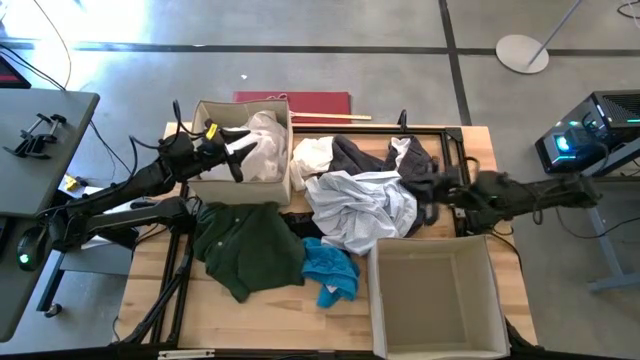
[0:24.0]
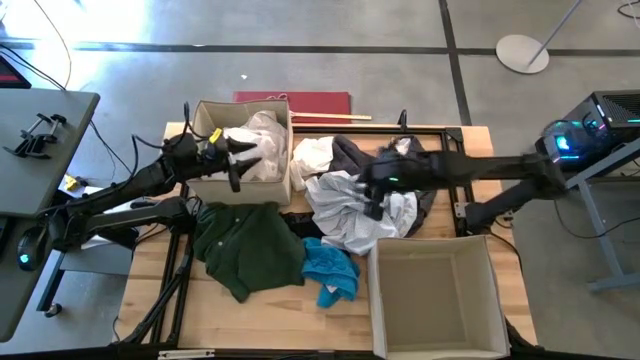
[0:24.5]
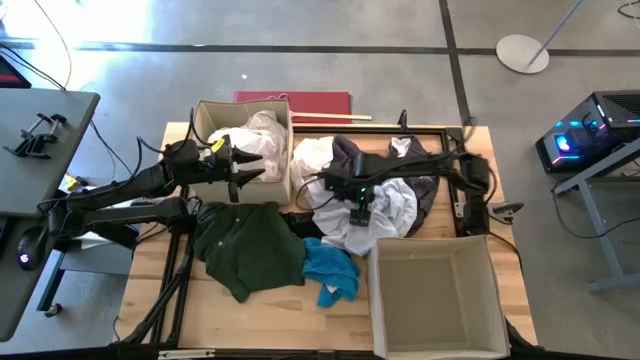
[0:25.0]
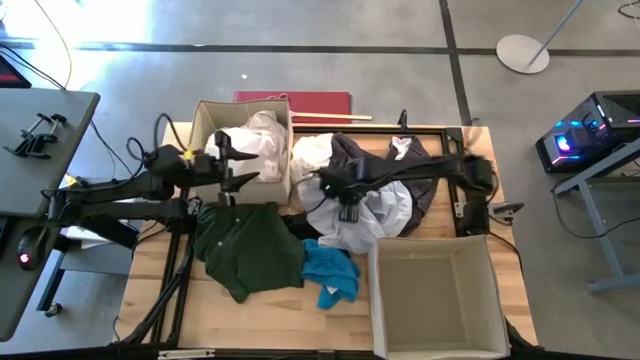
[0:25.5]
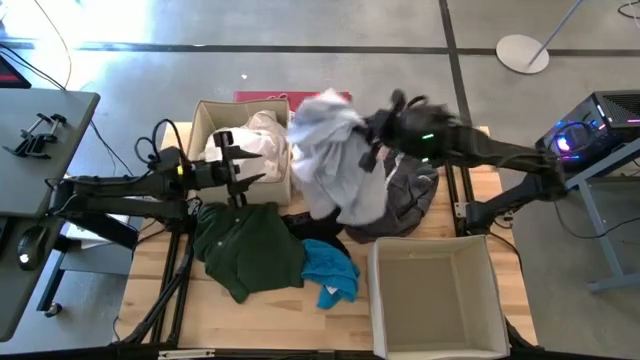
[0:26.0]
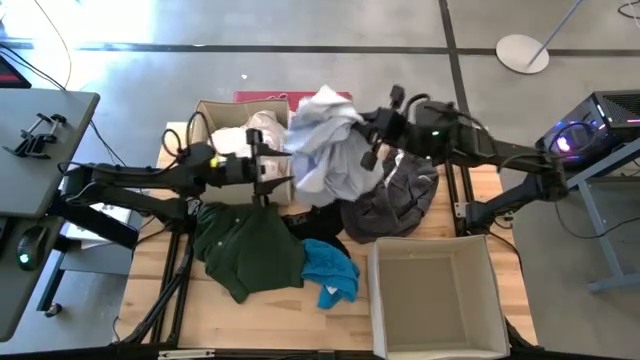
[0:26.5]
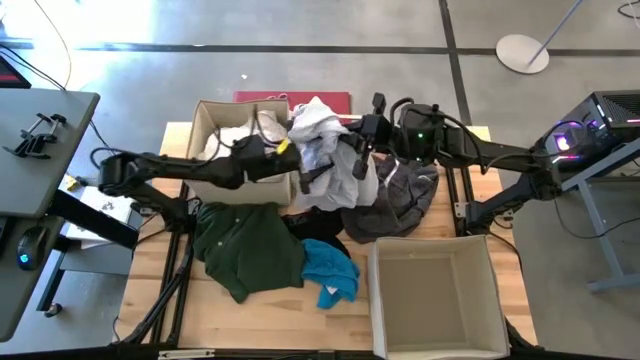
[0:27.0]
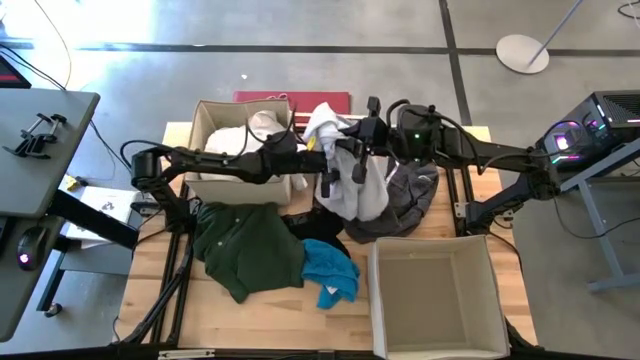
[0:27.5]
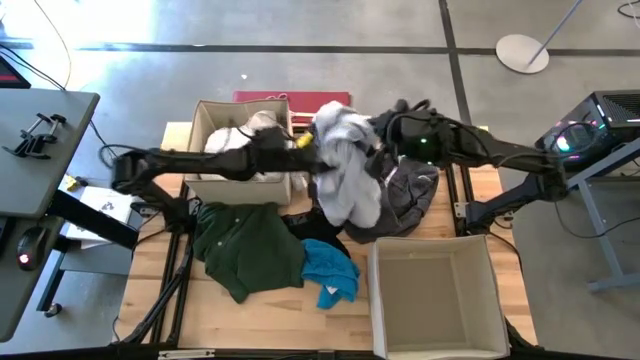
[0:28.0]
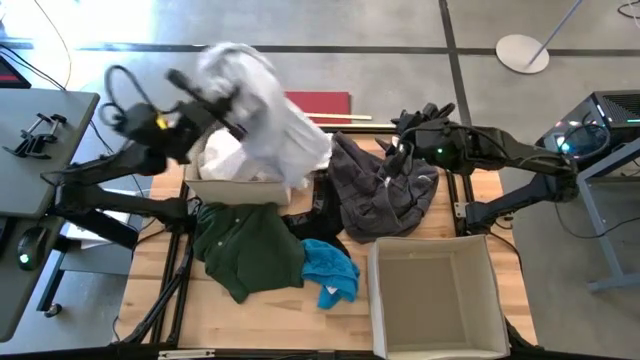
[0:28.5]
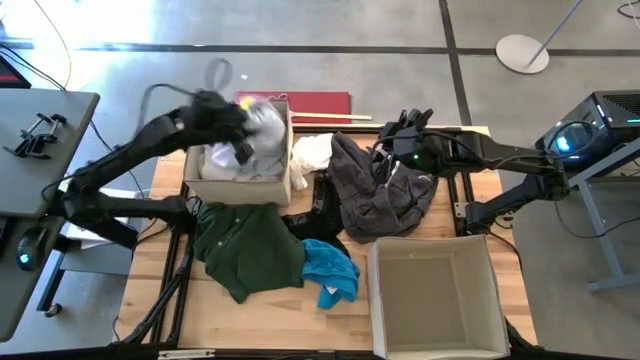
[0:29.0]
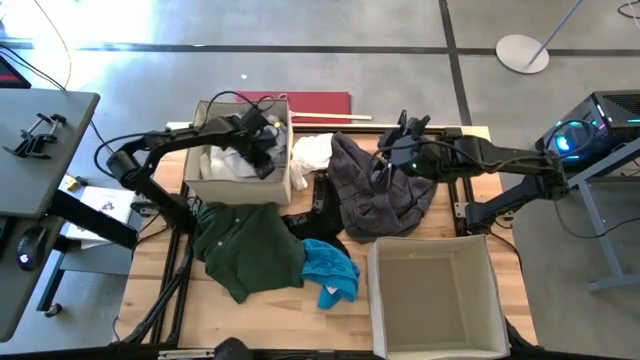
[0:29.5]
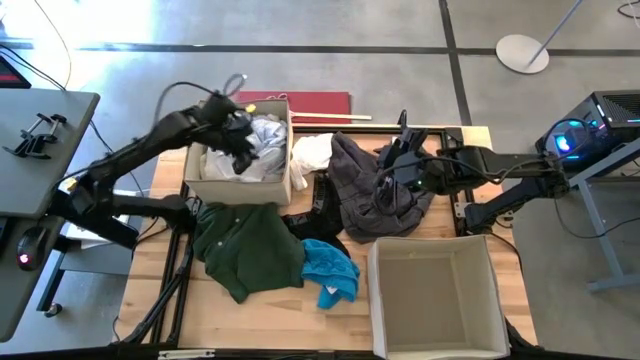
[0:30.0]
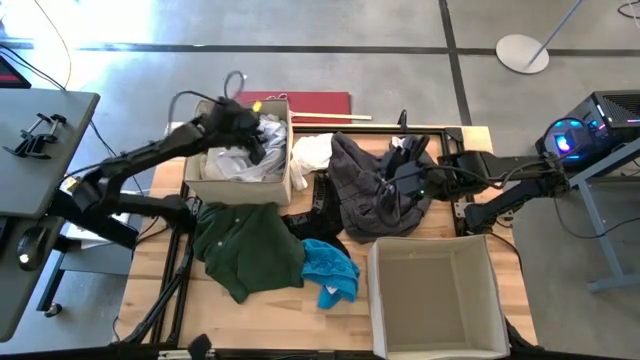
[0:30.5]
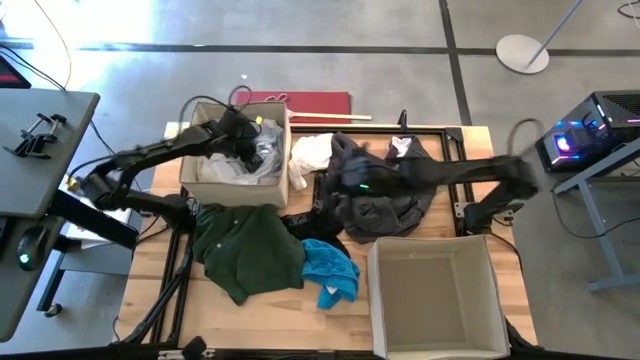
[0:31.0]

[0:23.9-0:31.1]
Task: Sort clothes
Put the gray dotted shirt into the top laundry organizer

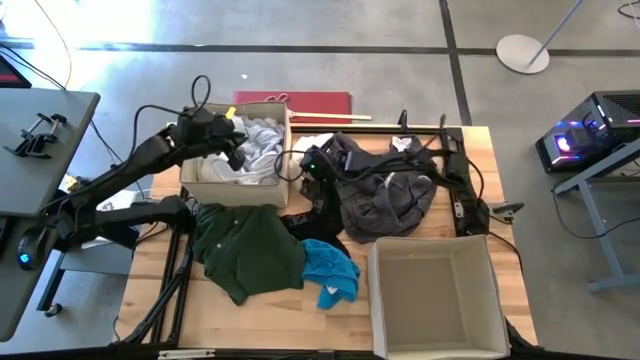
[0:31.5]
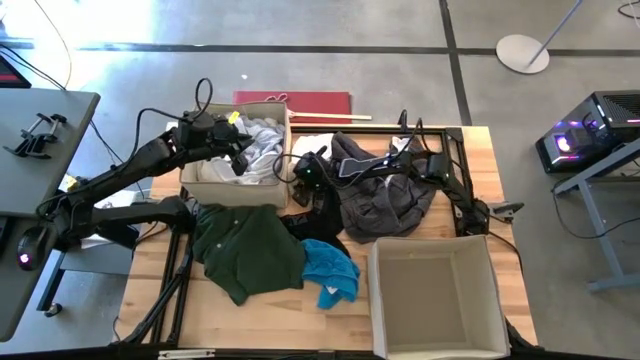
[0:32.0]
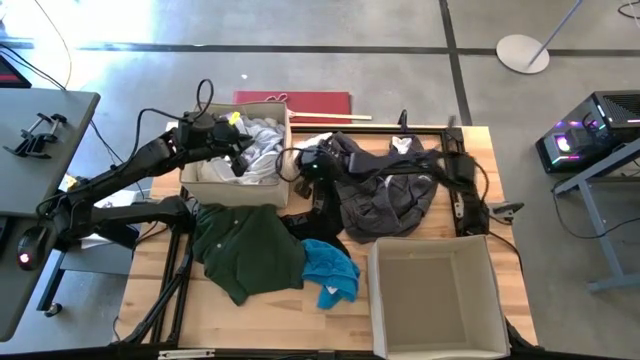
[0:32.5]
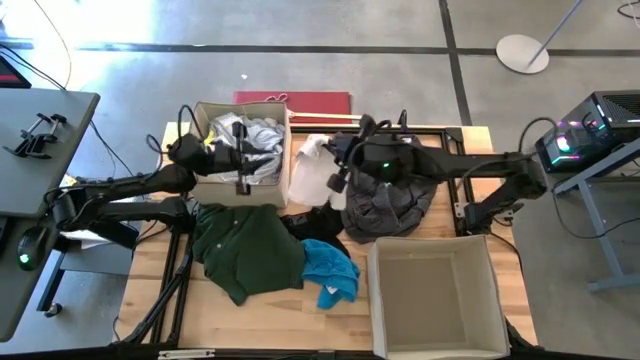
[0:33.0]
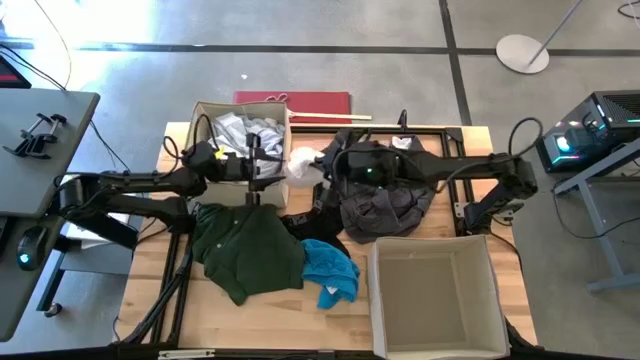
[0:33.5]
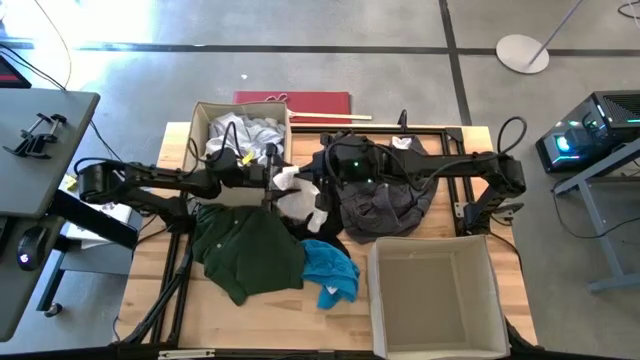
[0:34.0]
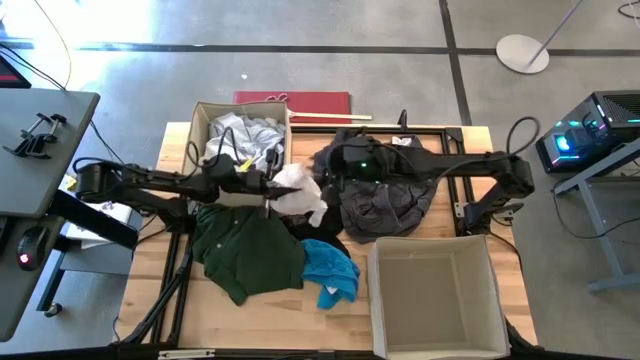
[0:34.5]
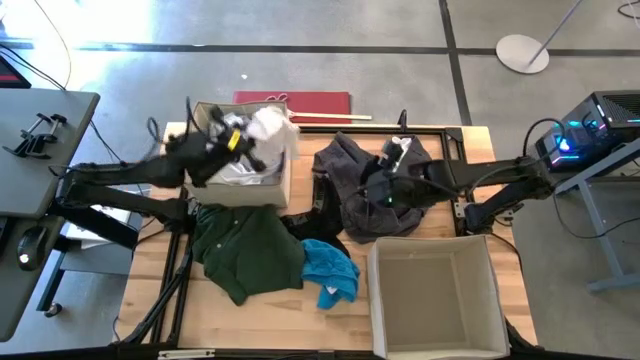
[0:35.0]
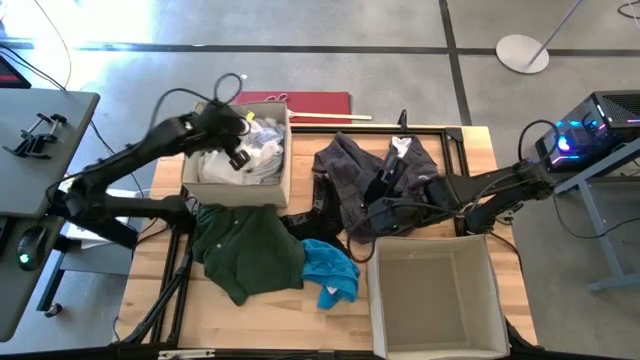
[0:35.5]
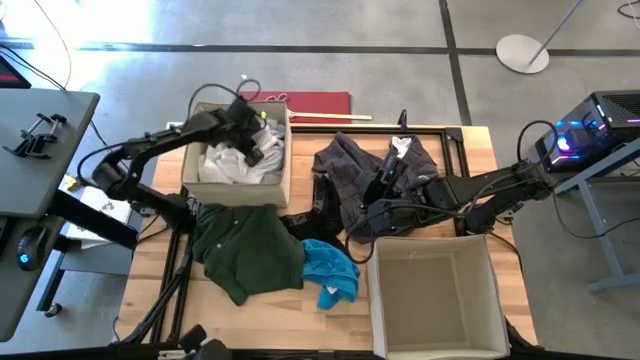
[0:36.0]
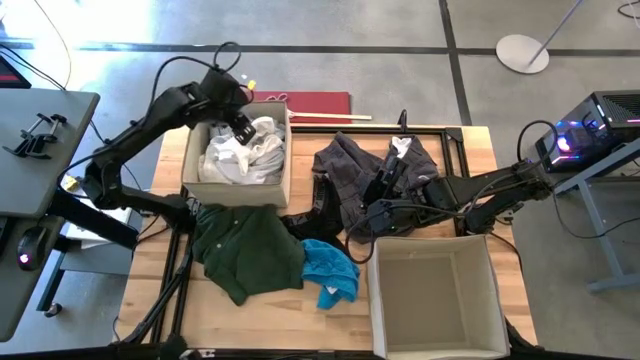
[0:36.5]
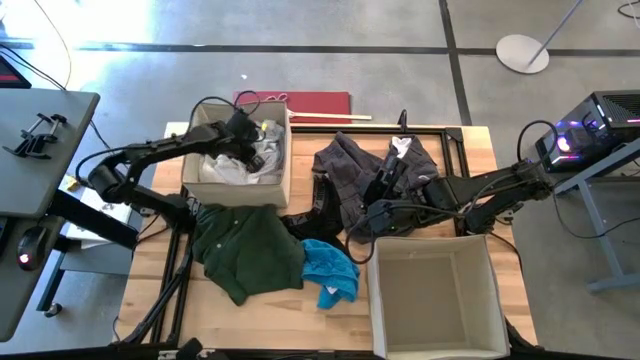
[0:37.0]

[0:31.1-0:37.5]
Put the white underwear into the top laundry organizer

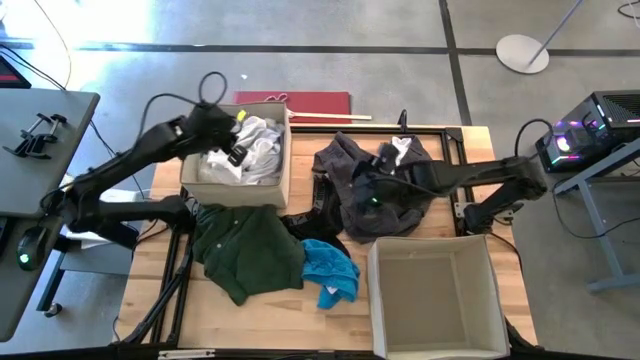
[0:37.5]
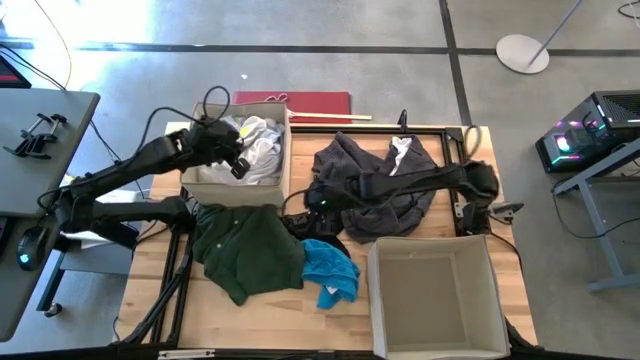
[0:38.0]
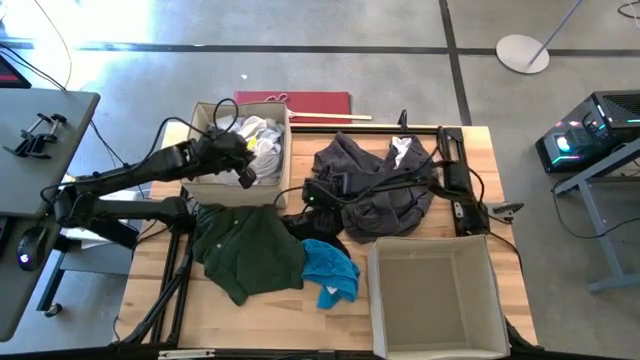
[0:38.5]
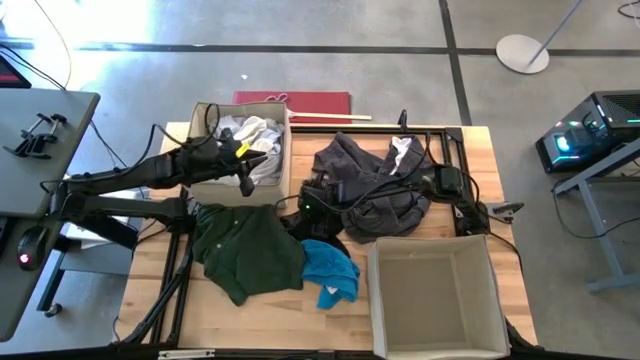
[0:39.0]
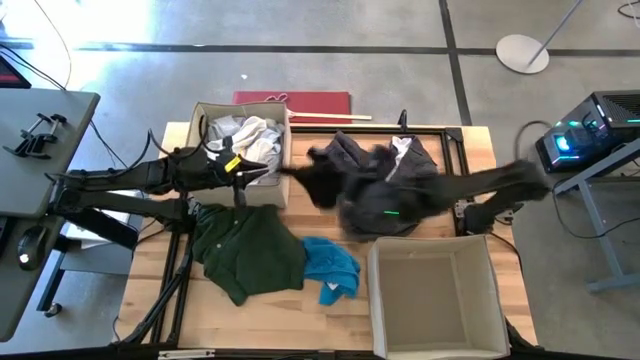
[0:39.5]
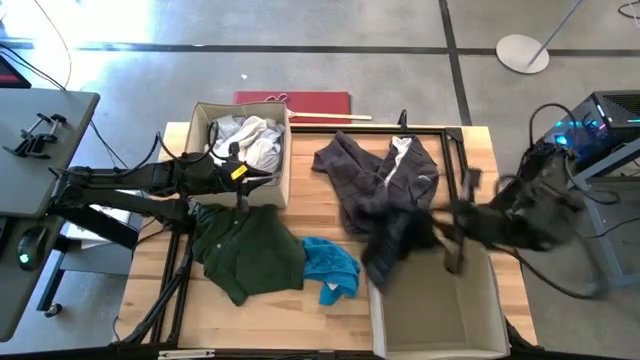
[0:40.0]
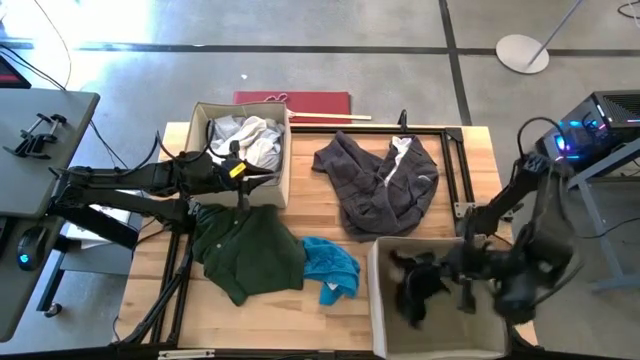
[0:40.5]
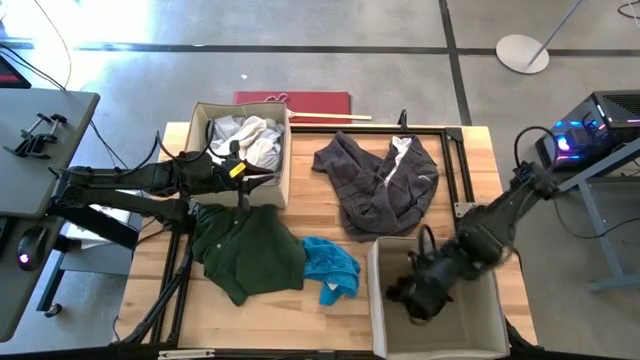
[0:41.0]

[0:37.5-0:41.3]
Put the black boxer into the bottom laundry organizer

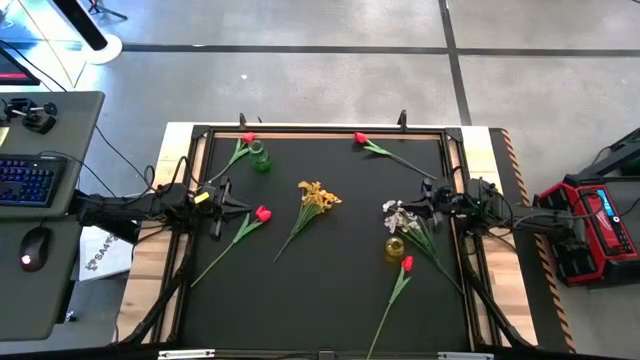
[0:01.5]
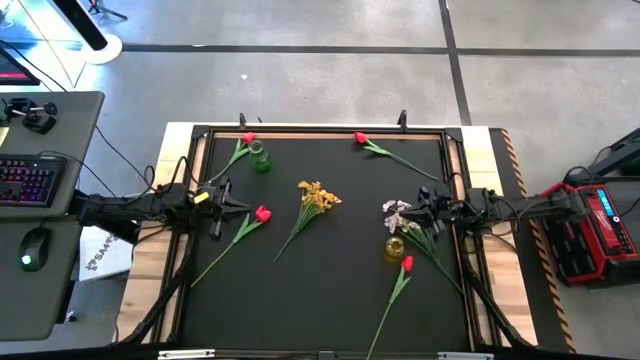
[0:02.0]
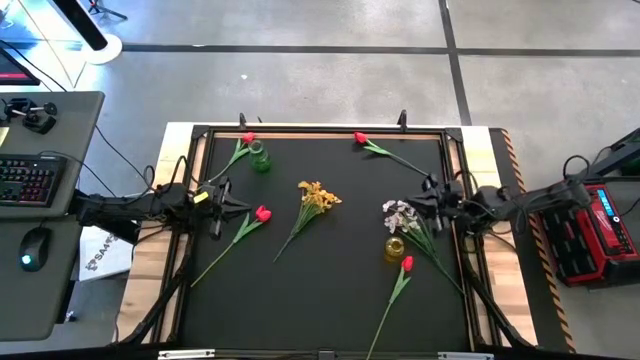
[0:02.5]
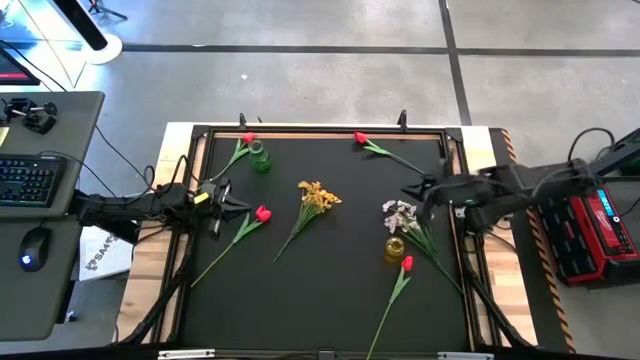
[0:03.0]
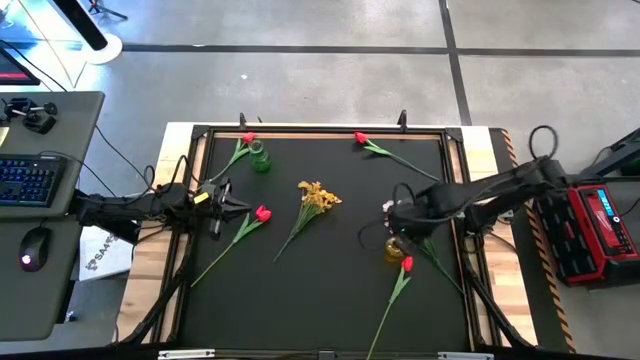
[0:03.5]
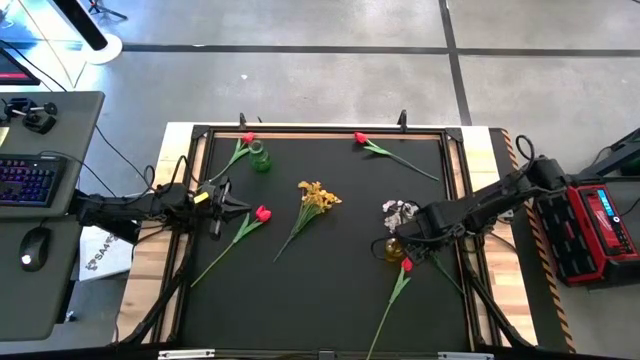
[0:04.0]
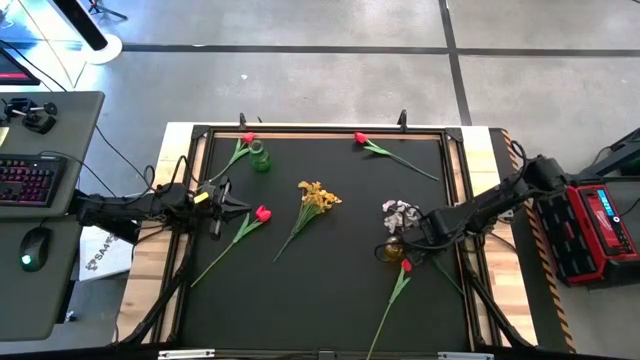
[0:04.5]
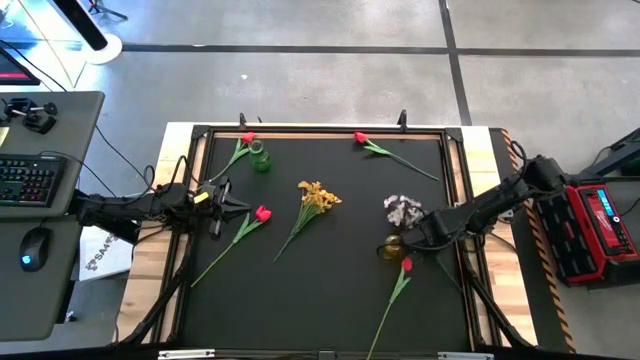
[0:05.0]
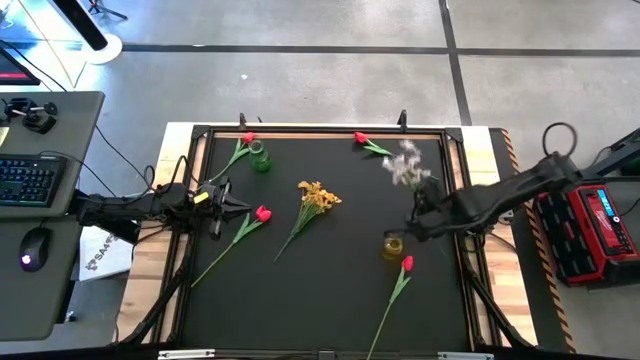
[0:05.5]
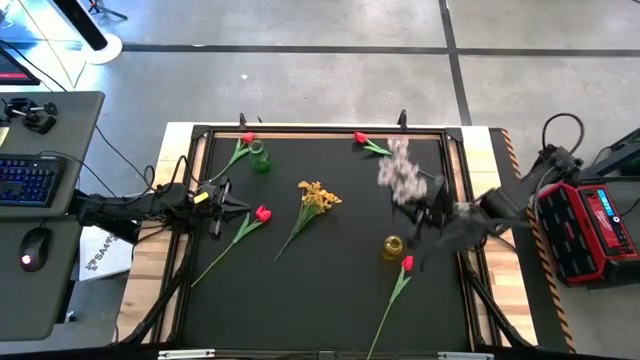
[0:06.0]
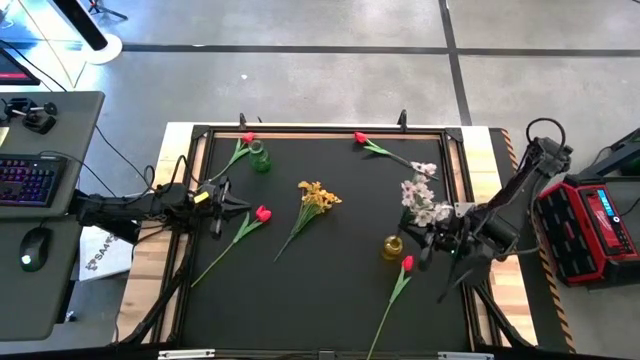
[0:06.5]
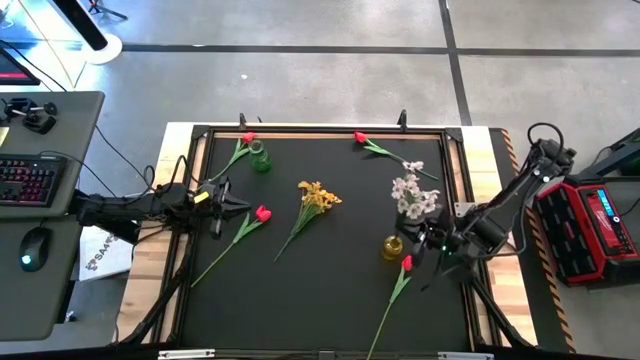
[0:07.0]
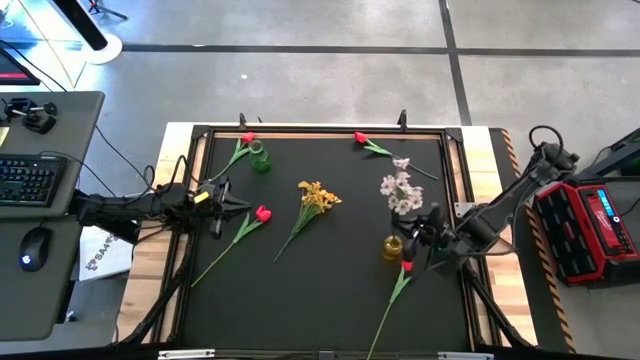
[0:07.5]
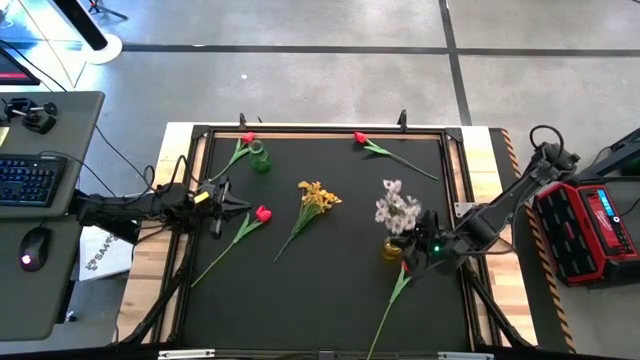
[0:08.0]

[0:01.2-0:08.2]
Task: Sort flowers into vase by color
Put the white flowers into the yellow vase
